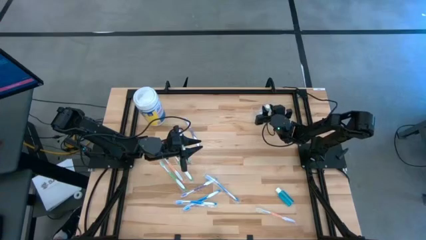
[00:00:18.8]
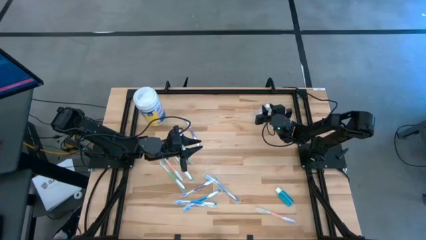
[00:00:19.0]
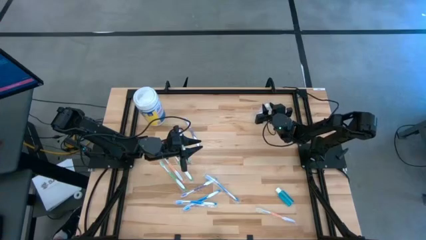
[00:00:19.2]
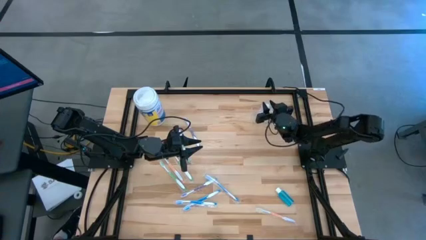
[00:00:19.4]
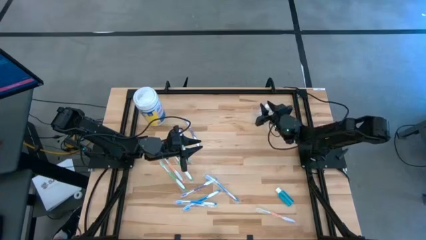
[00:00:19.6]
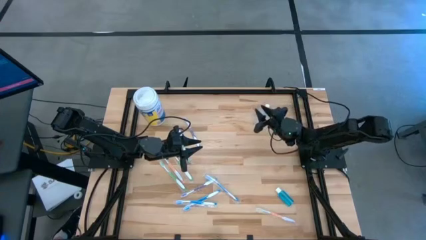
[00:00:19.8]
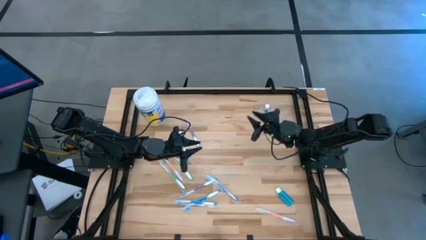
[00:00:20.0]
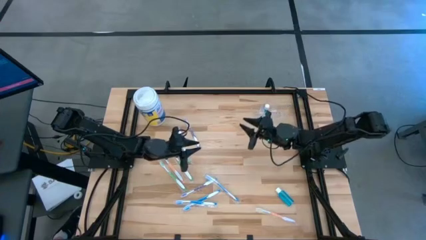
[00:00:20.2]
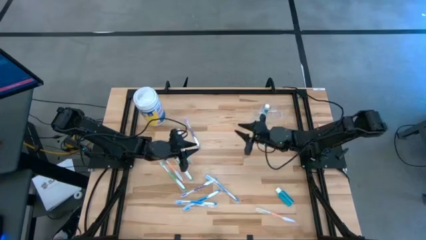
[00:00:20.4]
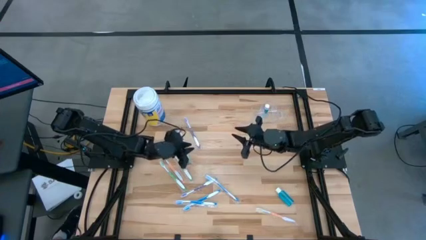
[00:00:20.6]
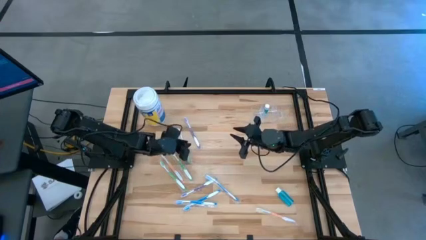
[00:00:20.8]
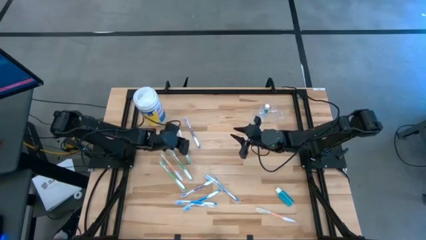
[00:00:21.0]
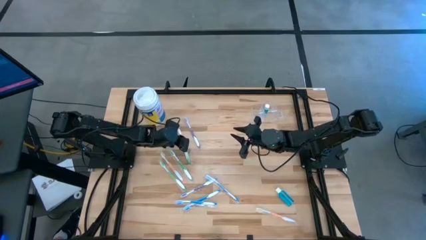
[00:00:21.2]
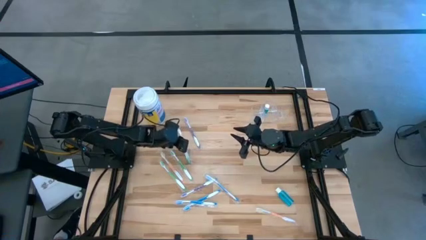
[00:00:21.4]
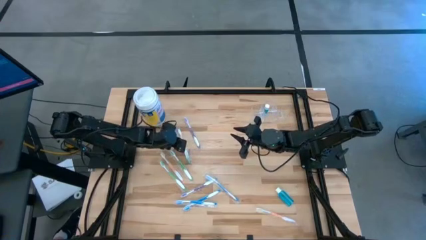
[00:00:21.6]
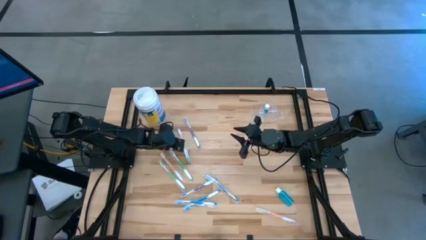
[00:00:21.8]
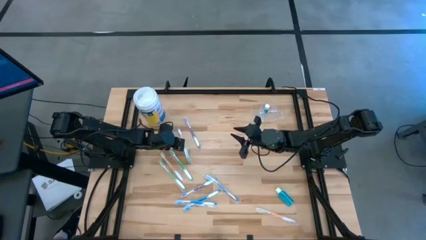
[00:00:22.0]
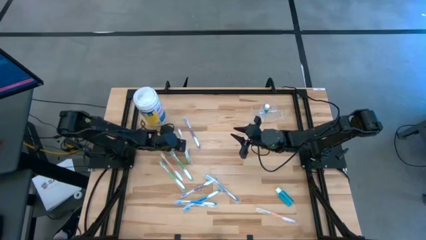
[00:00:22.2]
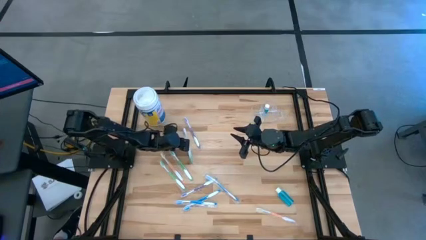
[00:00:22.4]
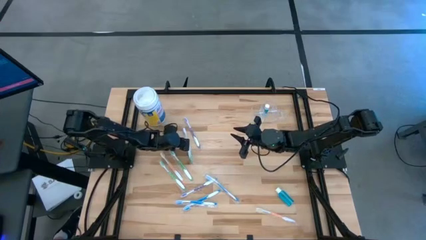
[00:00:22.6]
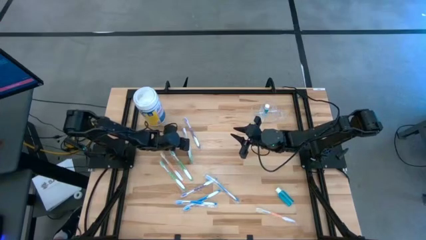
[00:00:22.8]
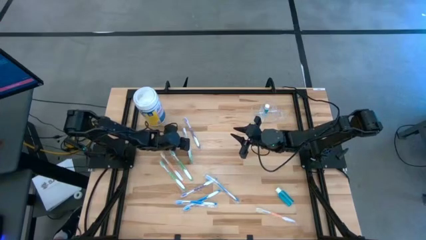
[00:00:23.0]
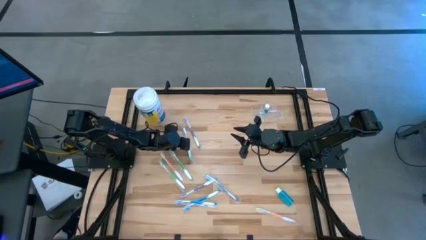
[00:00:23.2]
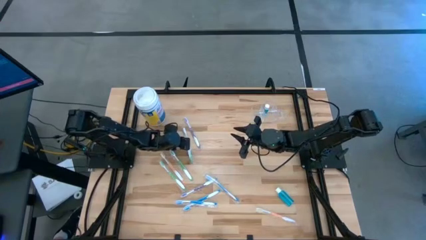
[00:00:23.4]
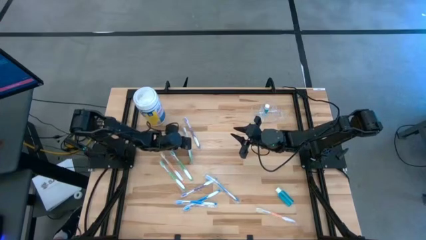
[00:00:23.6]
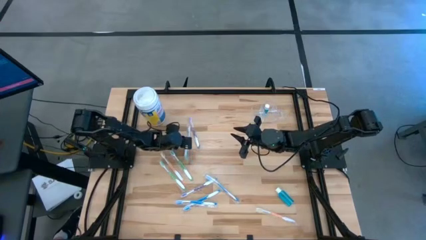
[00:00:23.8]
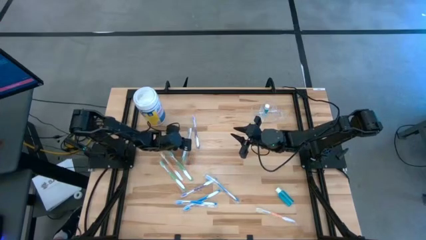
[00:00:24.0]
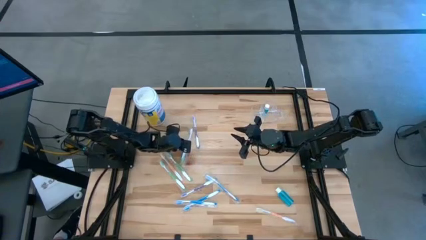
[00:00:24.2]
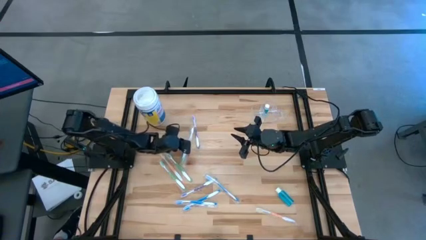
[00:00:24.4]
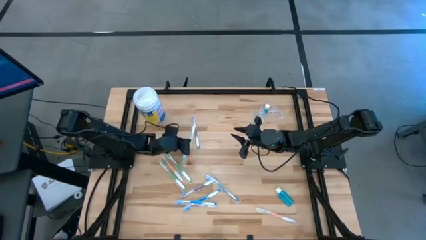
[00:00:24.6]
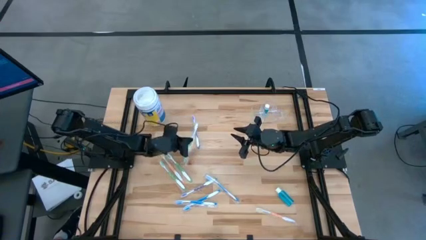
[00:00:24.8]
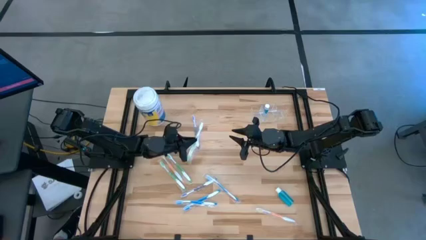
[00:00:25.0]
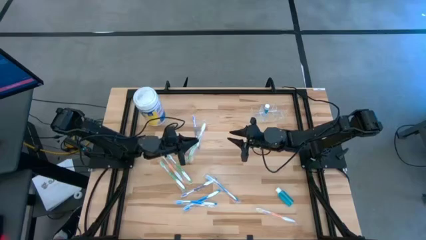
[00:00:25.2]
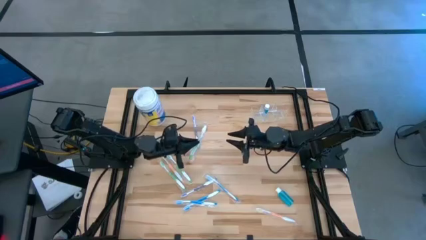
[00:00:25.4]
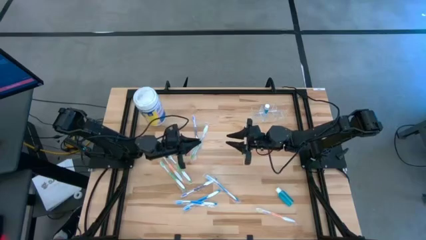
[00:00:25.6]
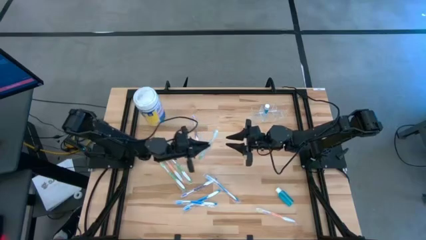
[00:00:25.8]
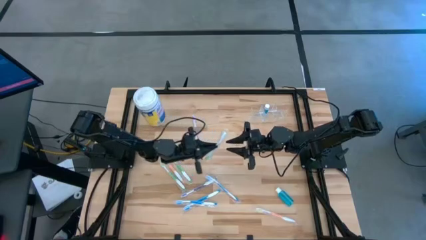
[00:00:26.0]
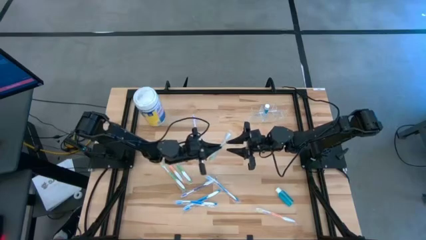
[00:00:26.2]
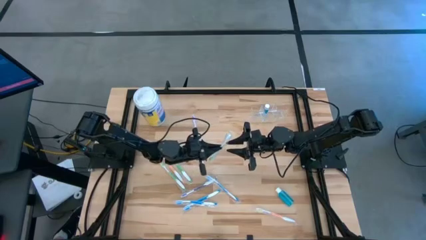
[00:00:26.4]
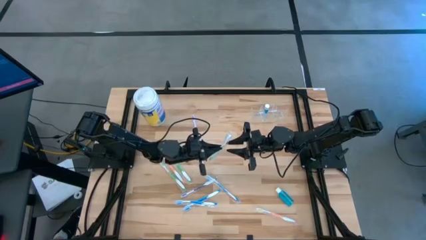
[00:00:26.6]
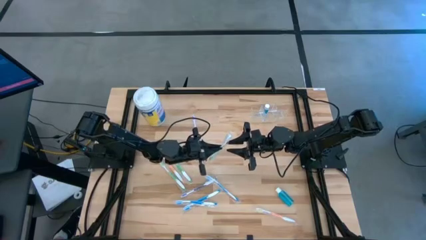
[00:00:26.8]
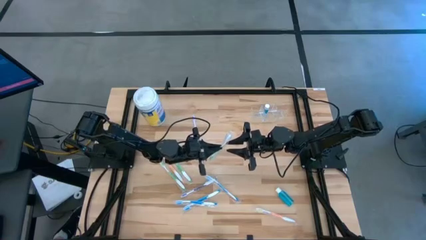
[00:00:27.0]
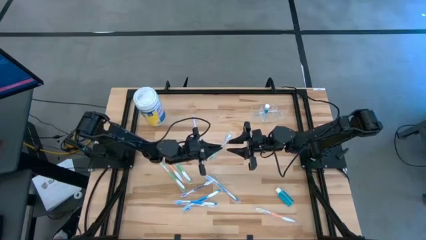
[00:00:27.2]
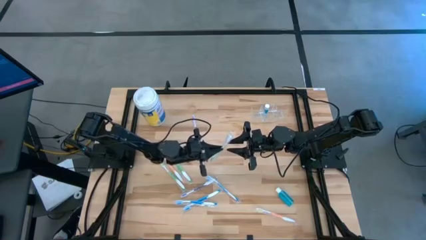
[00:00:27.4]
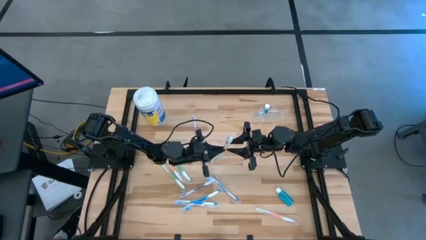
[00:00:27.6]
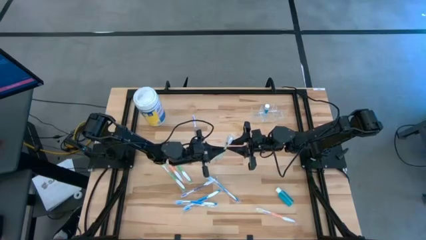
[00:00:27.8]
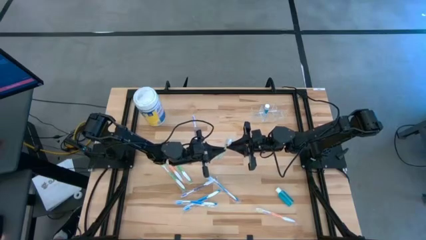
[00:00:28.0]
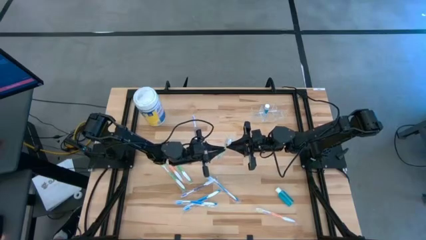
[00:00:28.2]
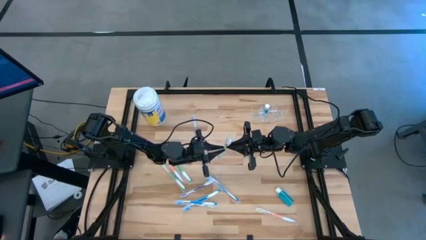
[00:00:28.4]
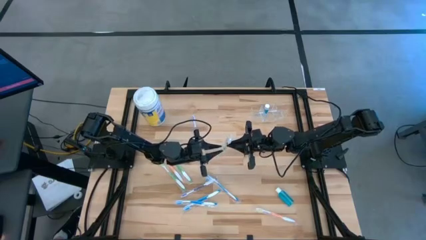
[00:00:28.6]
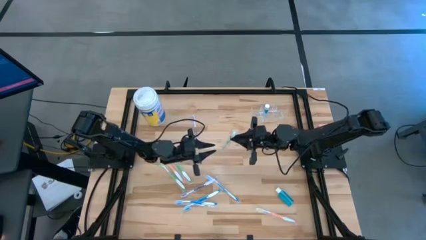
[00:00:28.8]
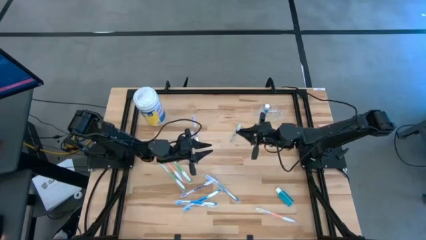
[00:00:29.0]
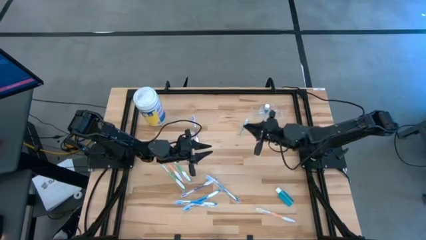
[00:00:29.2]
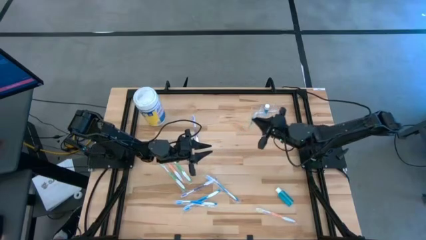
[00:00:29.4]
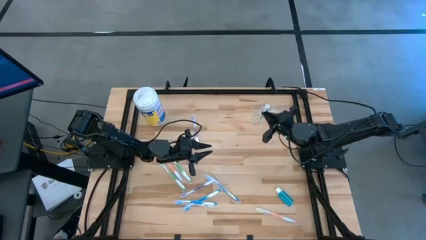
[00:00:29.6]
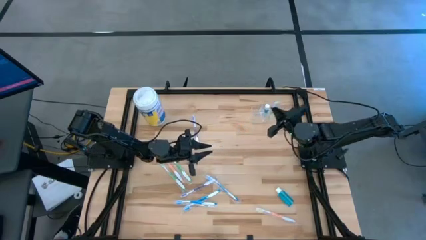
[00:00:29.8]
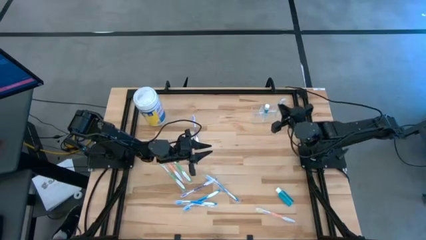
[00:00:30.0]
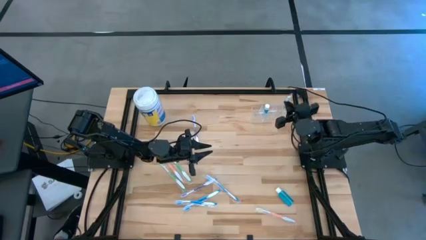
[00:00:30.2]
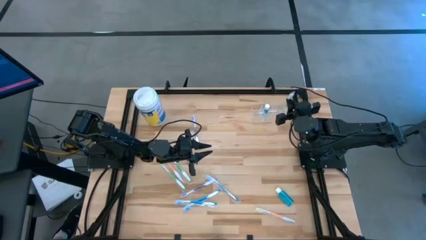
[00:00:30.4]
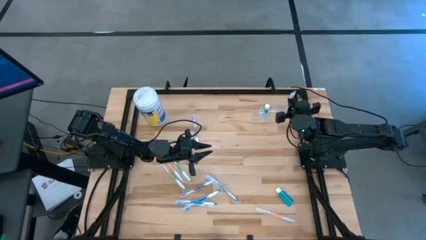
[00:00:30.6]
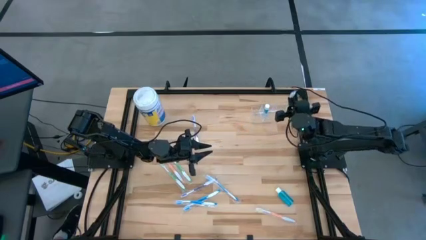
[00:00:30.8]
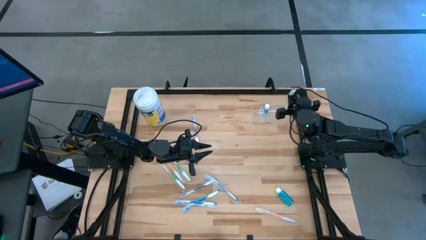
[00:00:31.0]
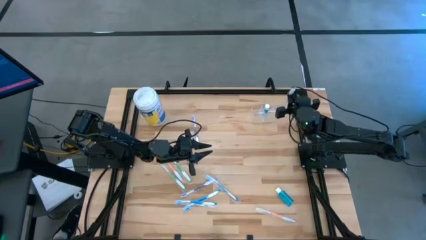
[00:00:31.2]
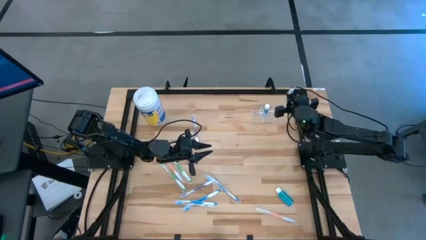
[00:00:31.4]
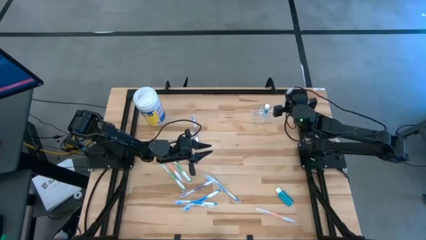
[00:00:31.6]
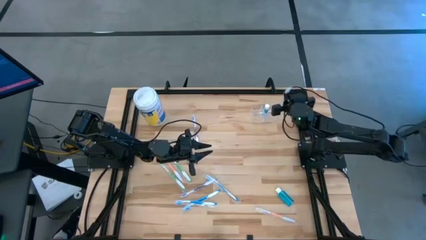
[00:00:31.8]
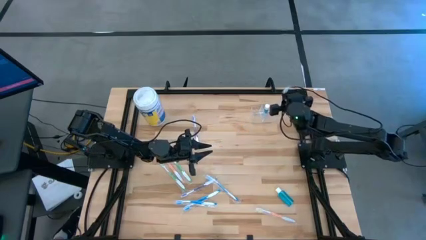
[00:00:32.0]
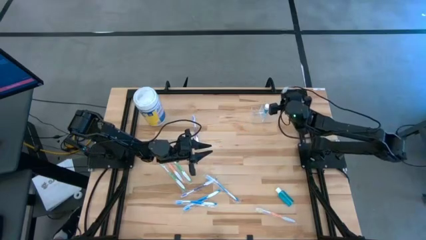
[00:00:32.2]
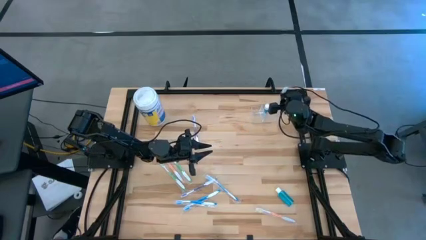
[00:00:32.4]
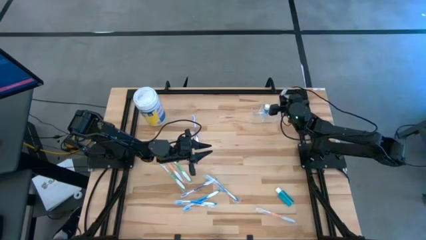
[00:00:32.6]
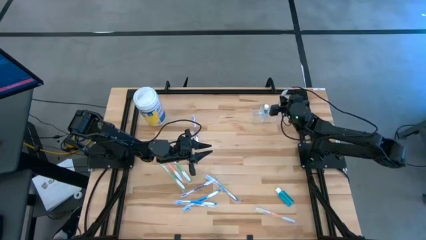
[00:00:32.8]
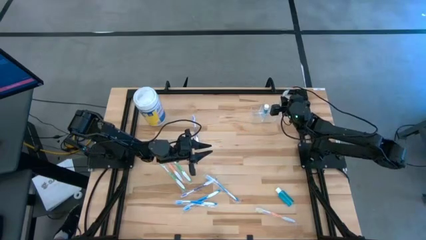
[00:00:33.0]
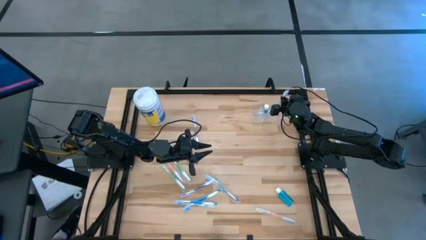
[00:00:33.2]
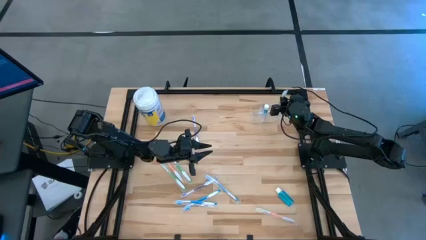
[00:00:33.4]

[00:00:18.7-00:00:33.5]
Task: Pick & Place toothbrushing station
Put the top green toothbrush into the right transparent organizer
